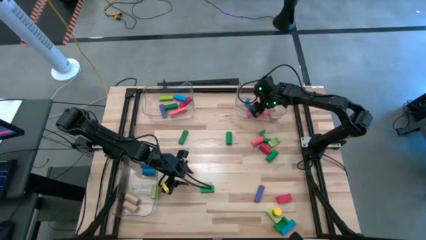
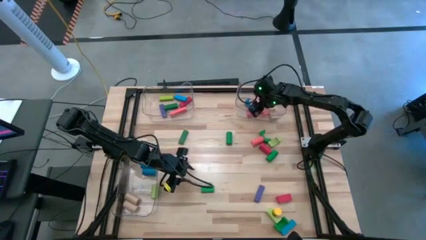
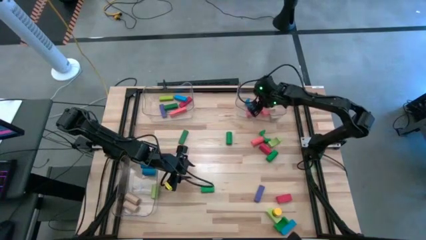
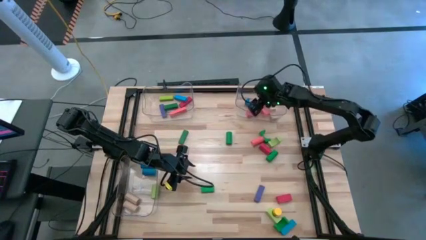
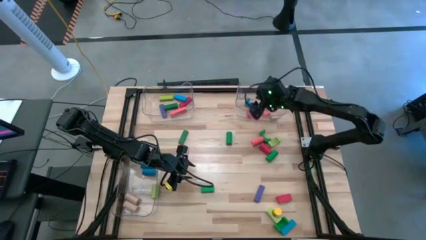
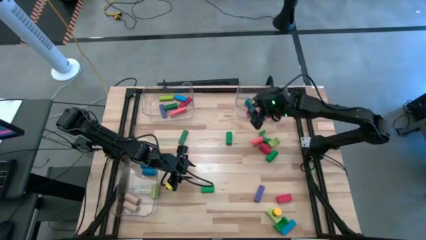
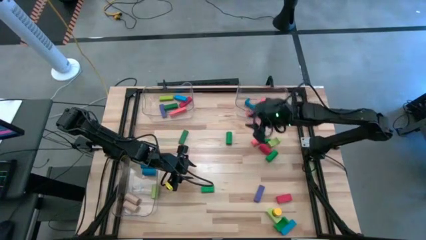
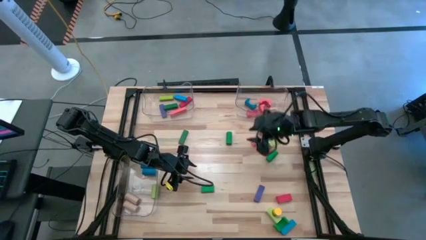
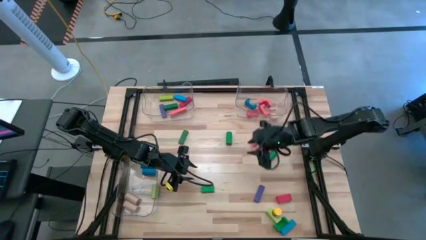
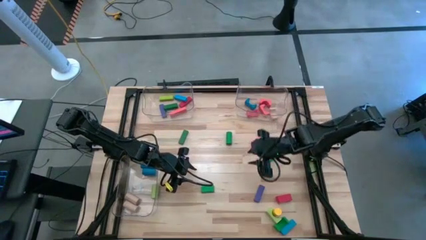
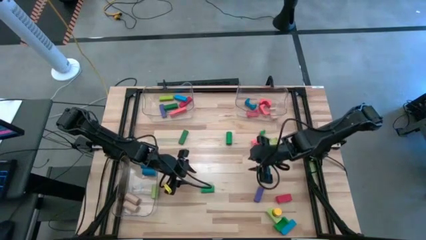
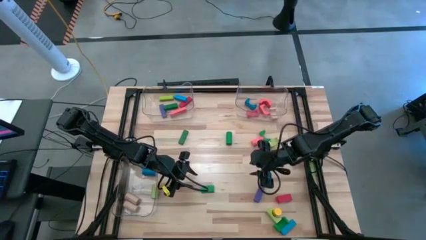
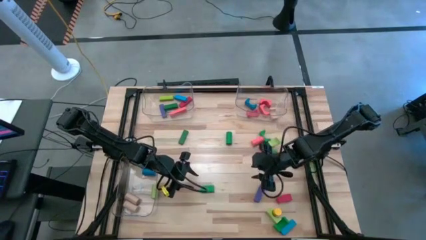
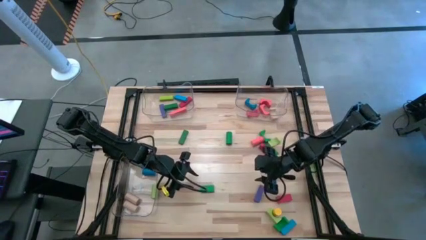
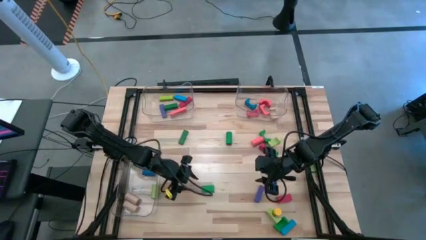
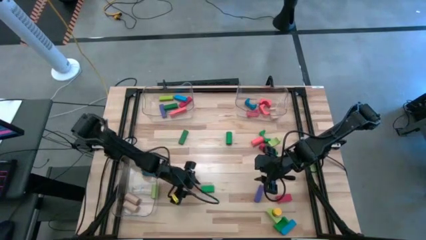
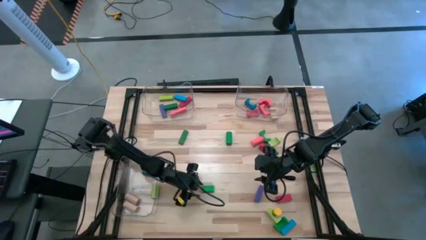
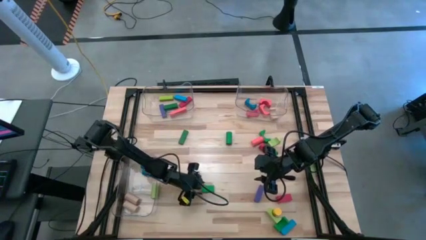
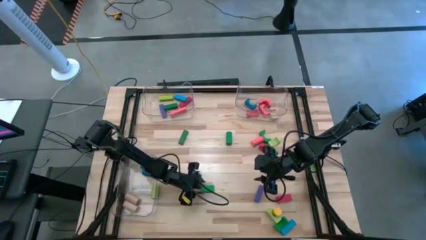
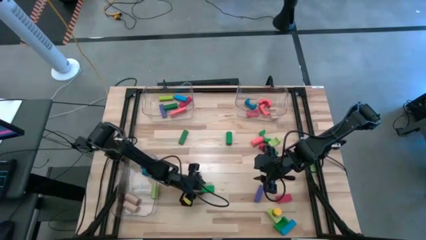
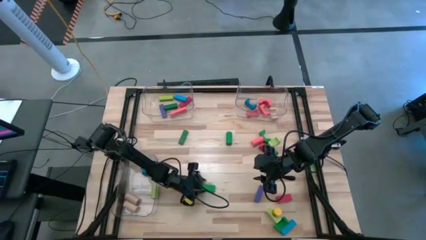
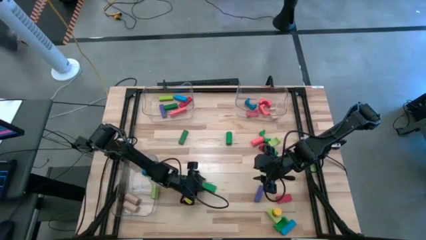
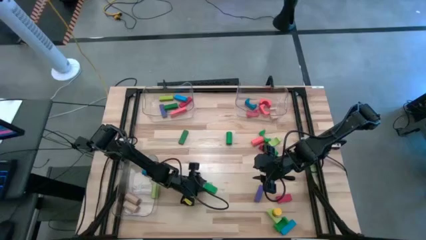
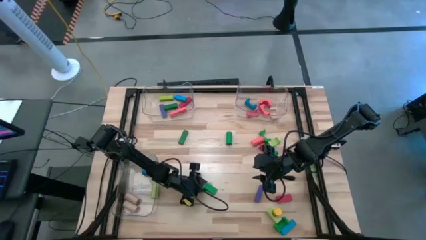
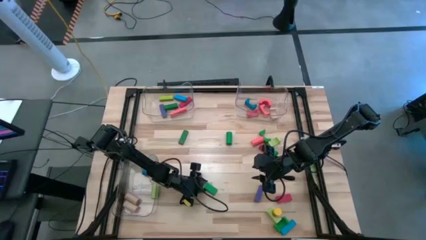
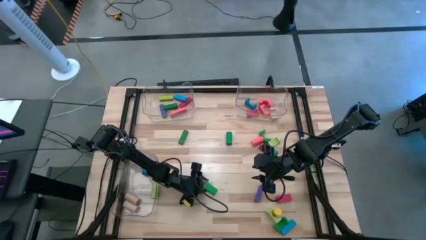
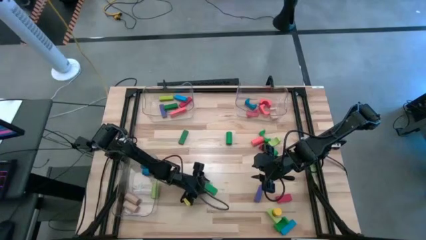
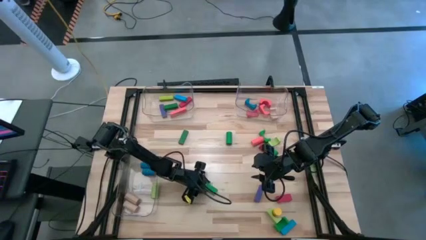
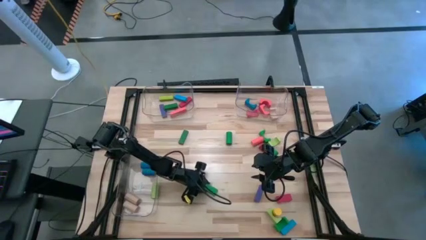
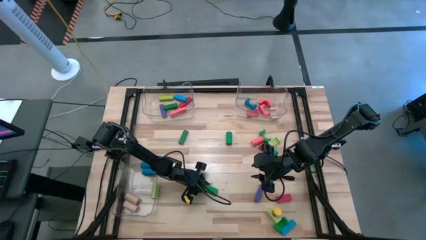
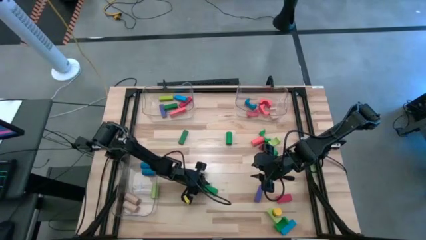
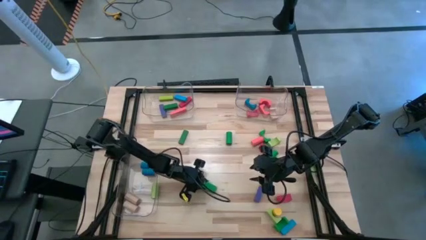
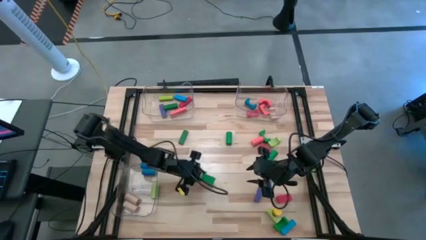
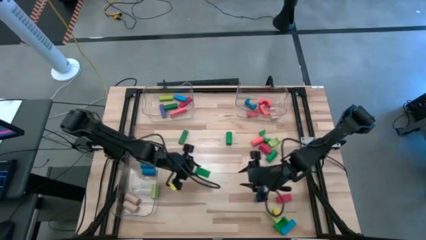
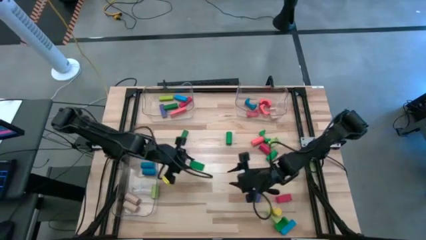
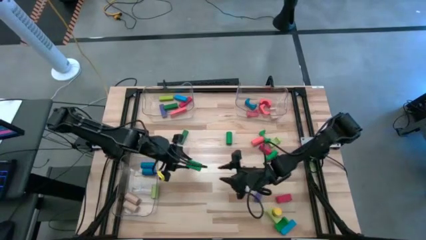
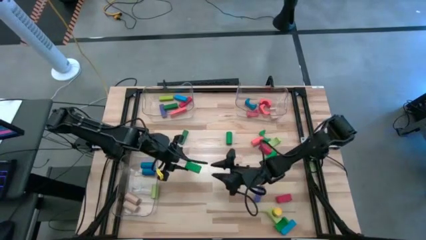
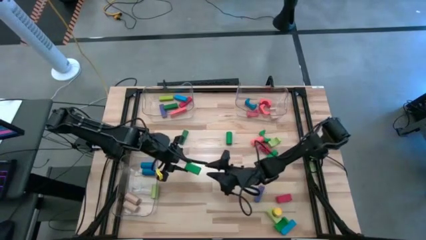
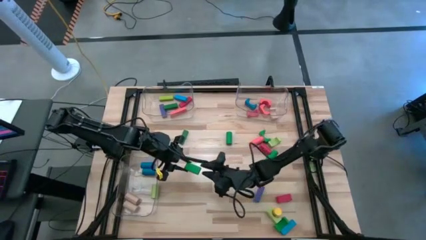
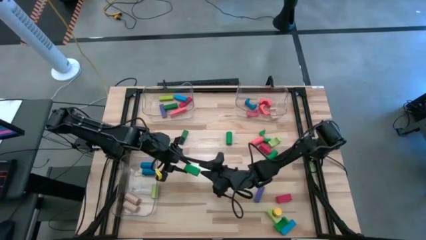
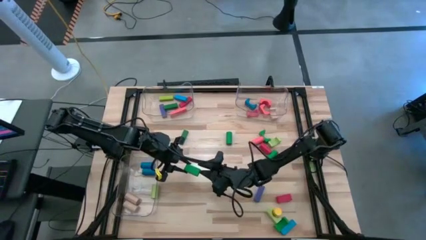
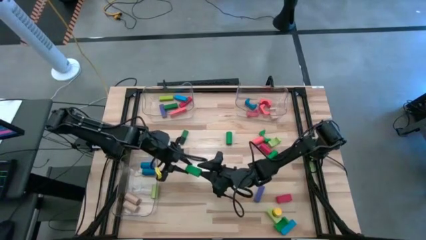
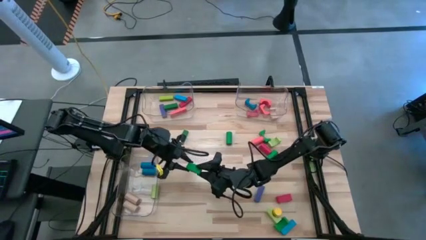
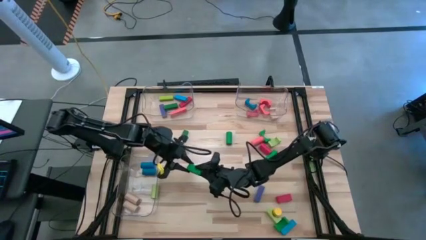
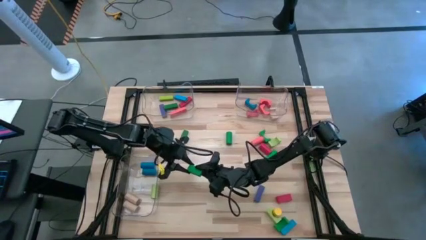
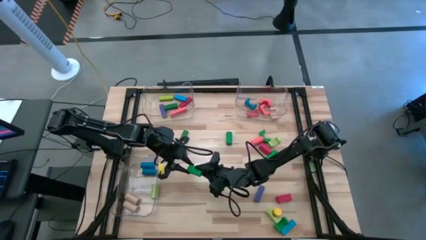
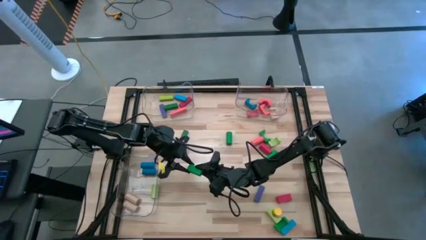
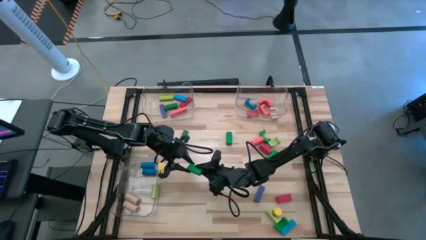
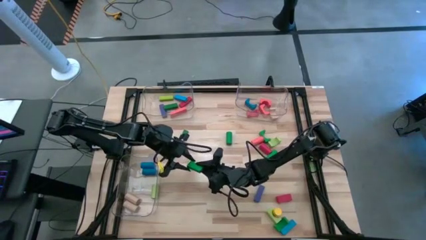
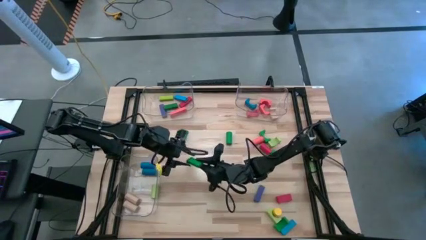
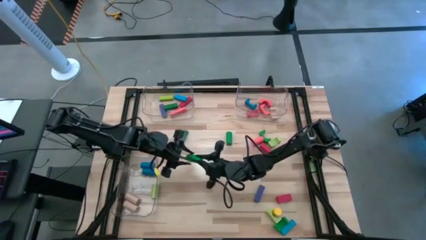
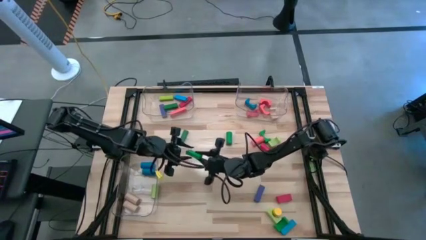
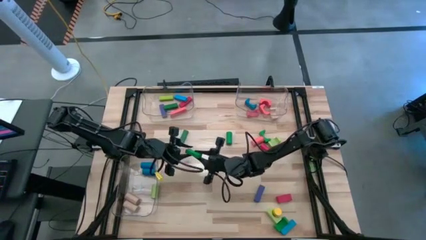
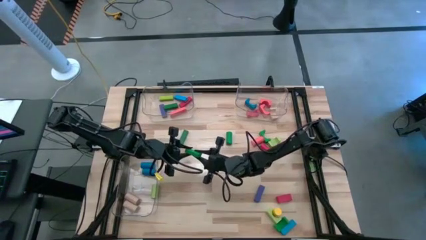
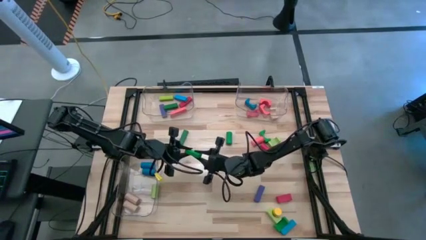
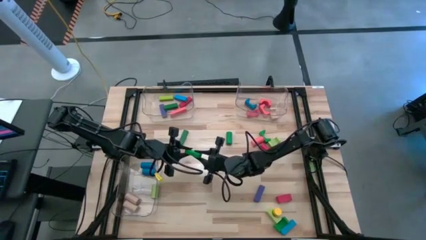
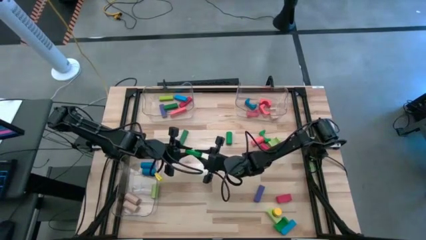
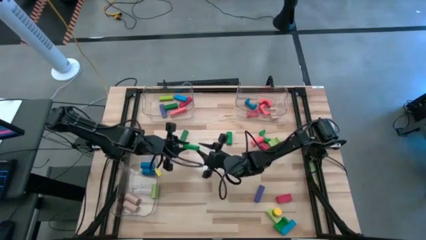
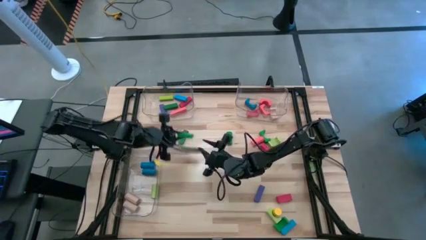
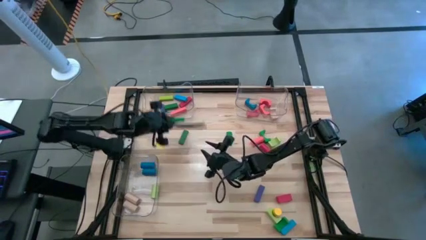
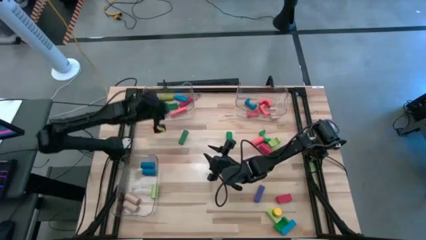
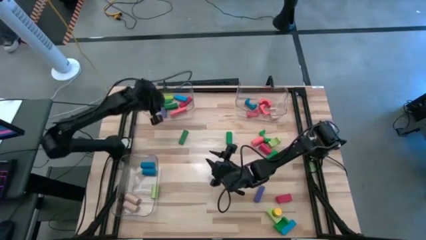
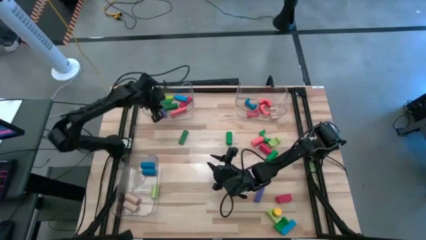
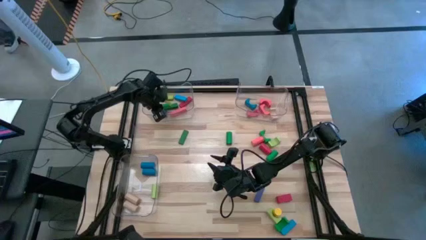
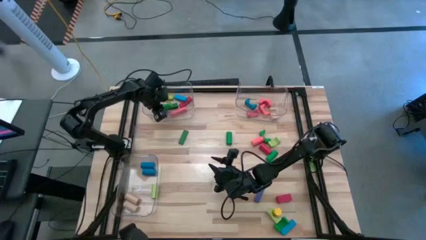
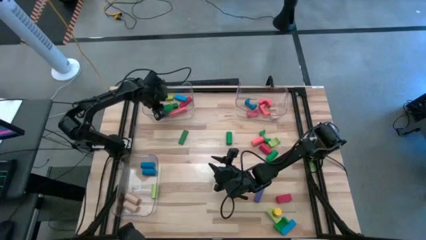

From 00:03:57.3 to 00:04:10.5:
Task: Sort blocks by size
Put the green rectangular block into the top left transparent bin

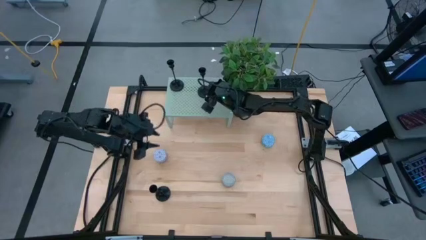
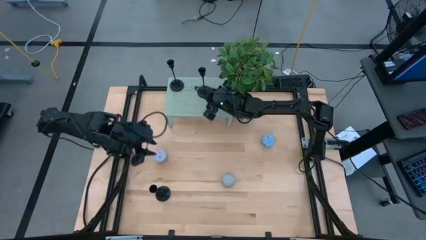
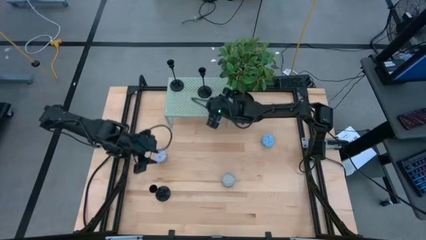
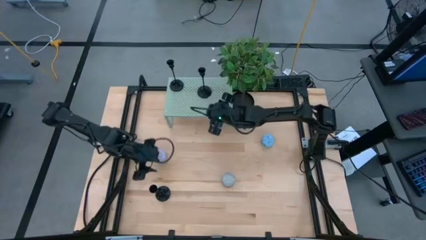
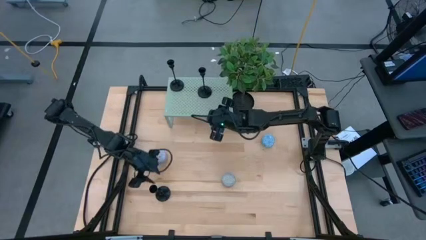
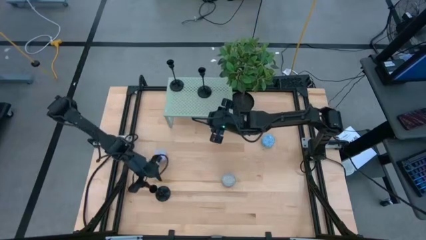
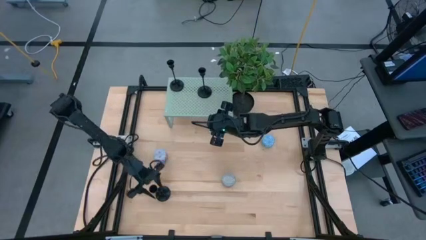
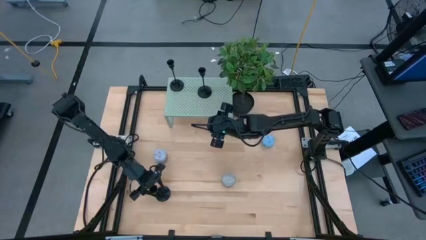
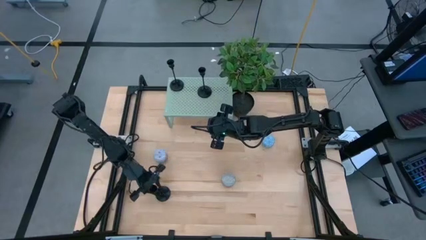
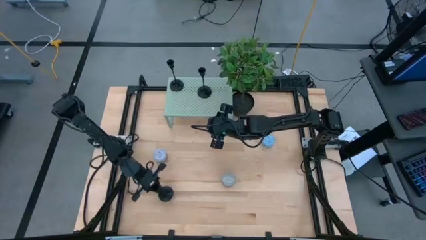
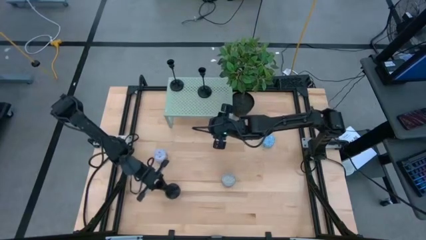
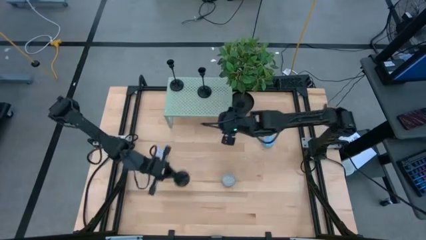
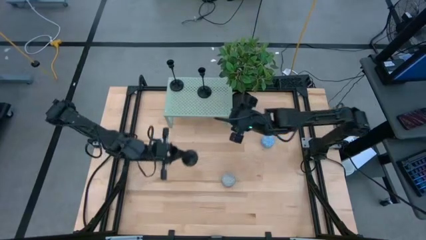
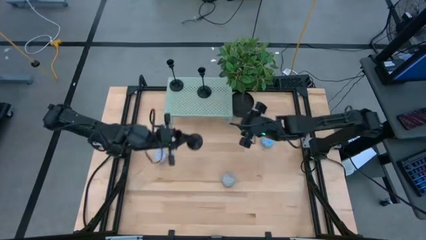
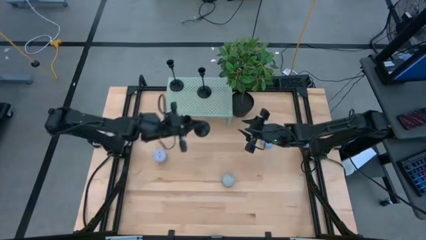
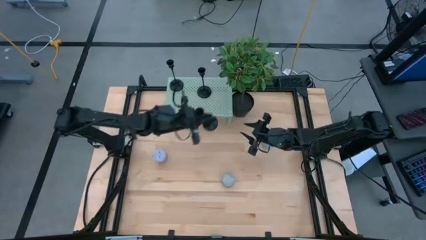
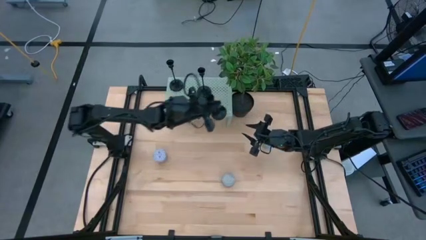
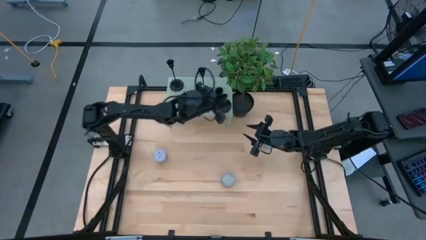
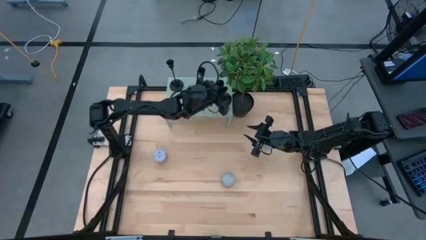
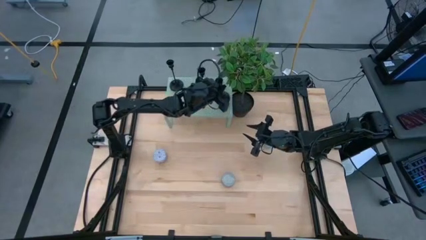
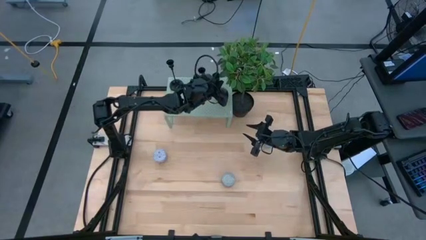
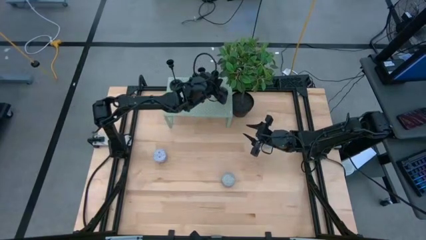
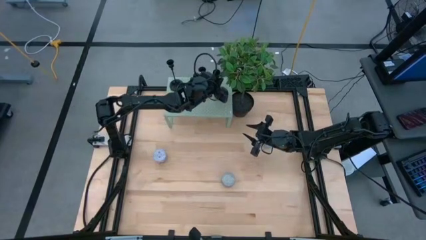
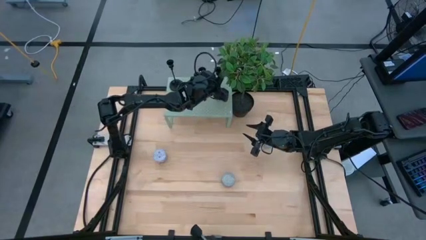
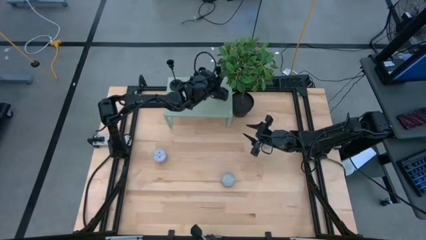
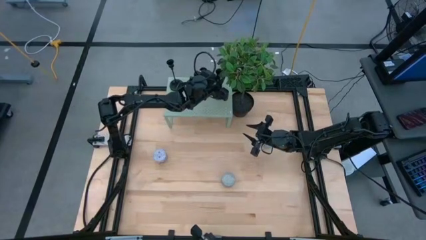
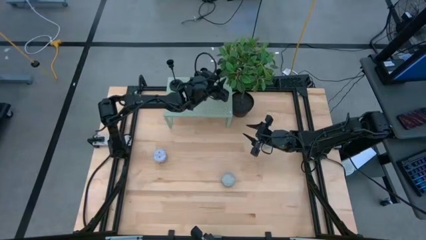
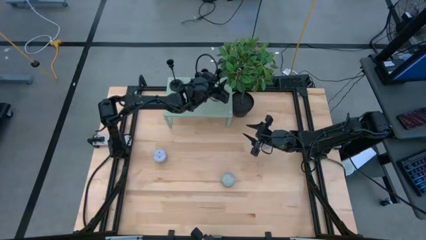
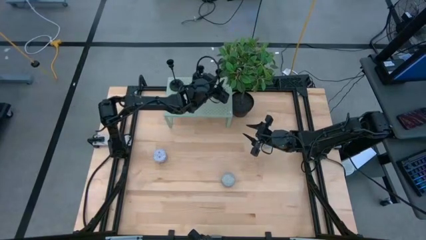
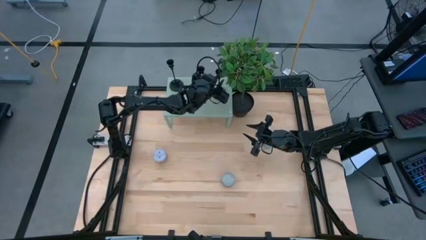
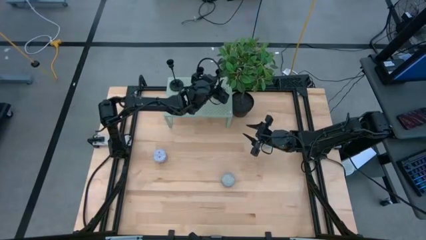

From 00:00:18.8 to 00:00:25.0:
Task: Pick & Place candle stick holders
Put the candle holder on the shelf aligned with the black candle holder
